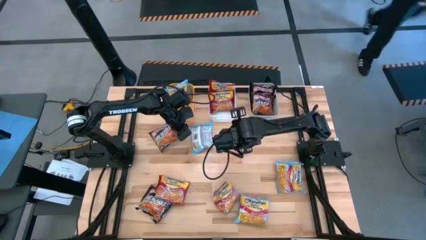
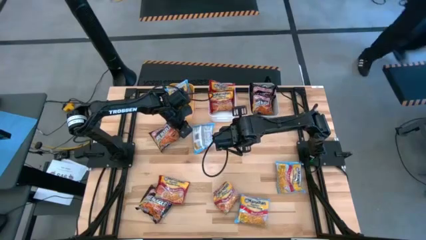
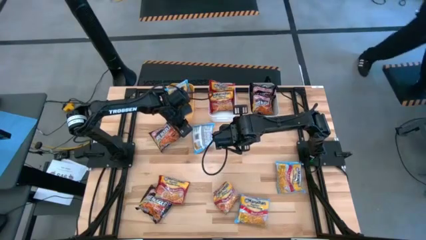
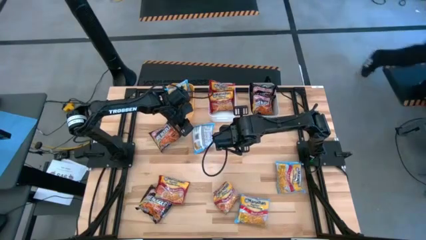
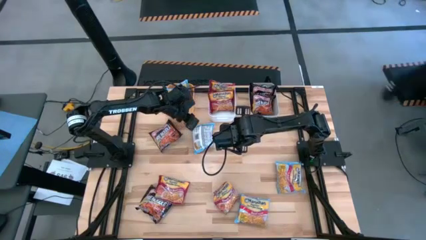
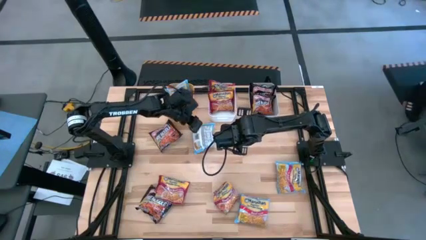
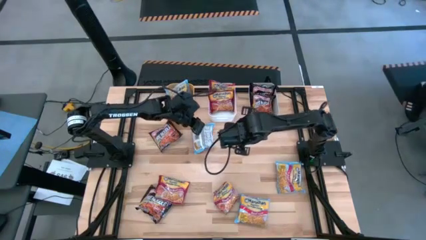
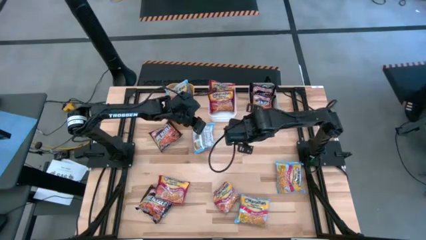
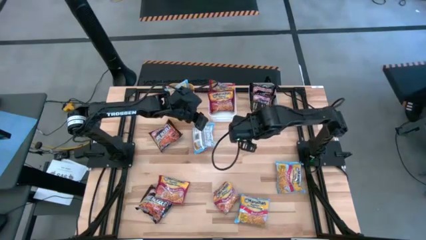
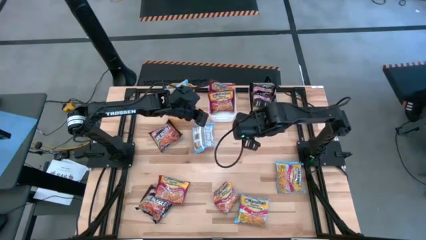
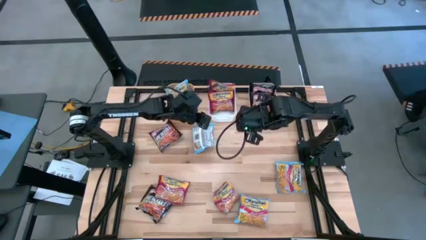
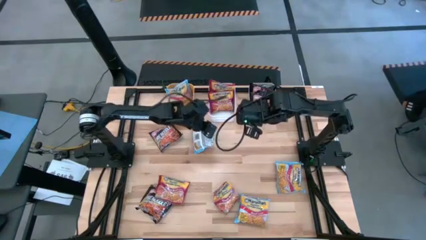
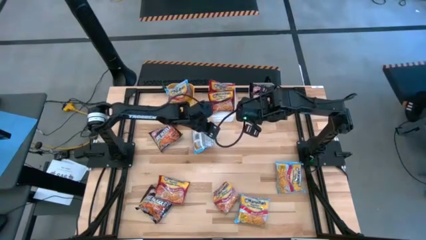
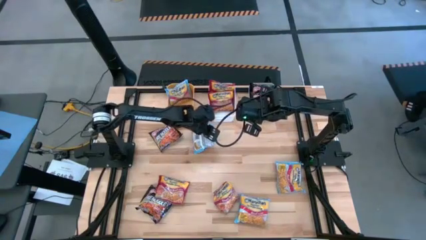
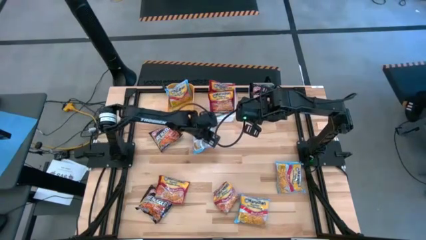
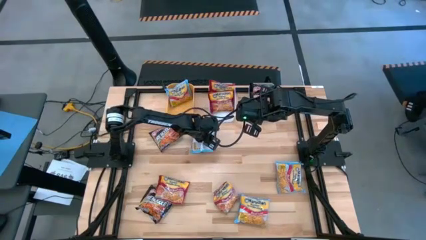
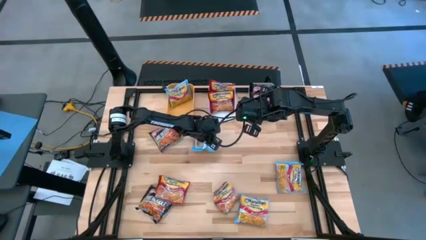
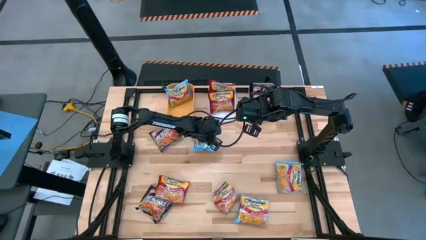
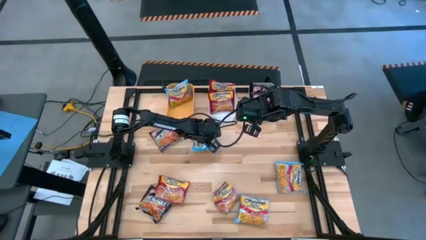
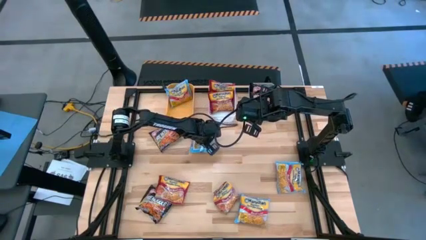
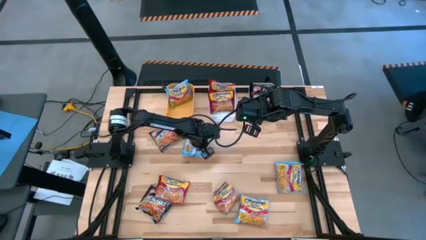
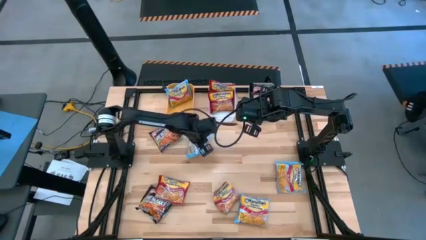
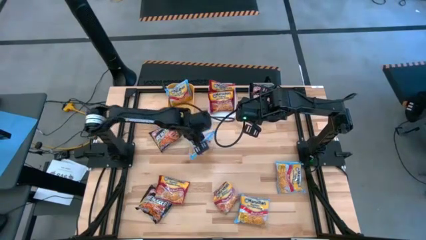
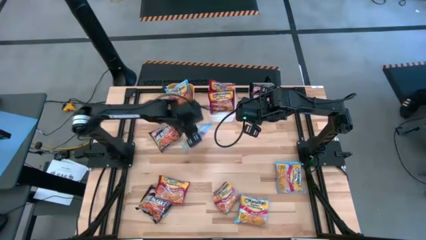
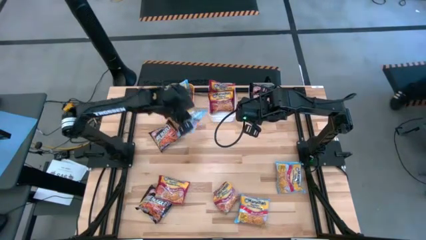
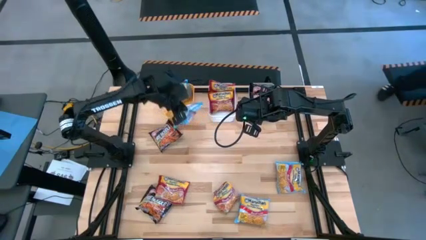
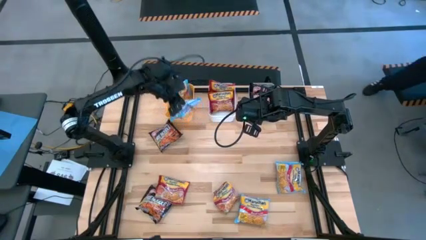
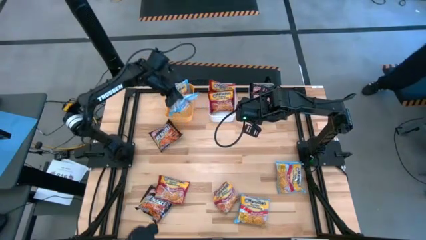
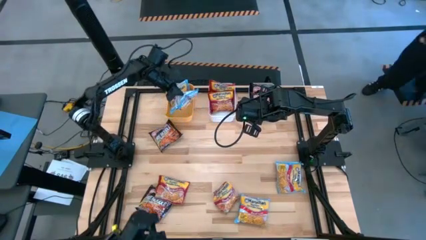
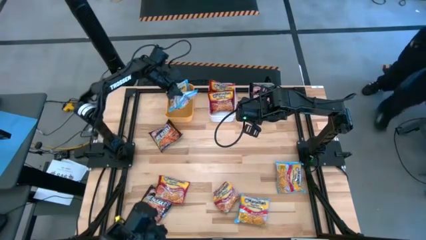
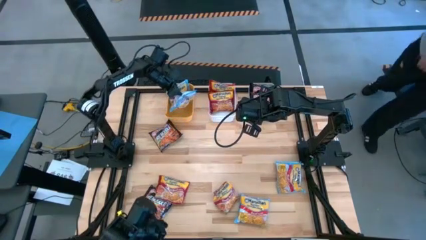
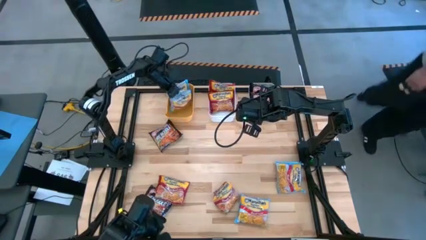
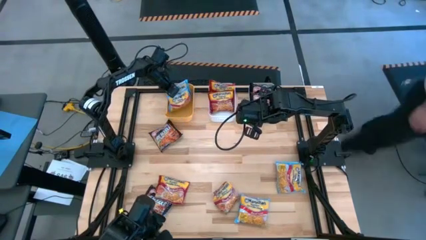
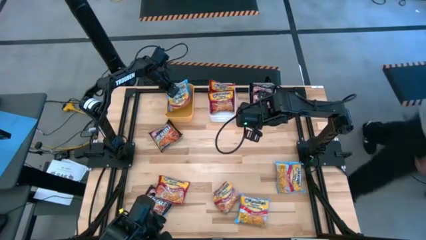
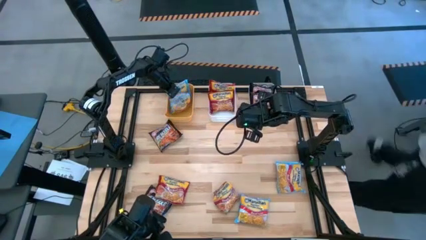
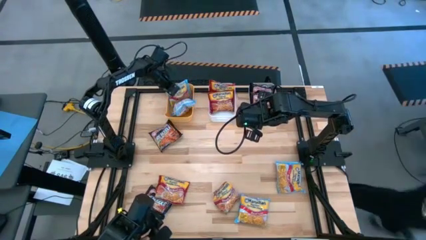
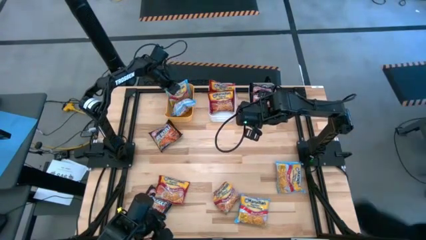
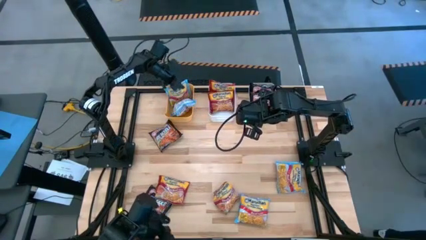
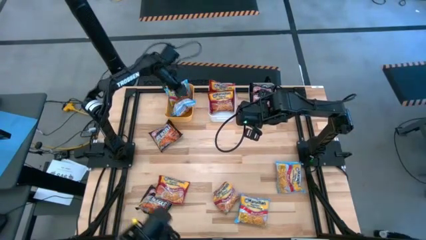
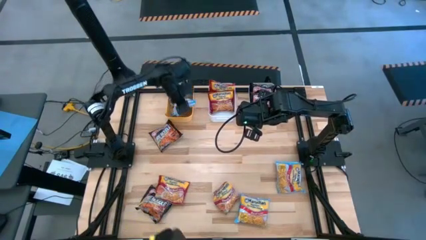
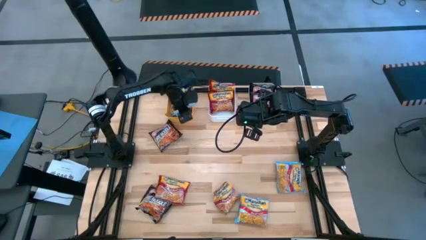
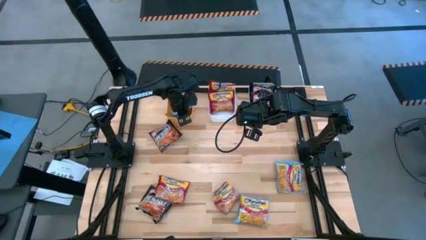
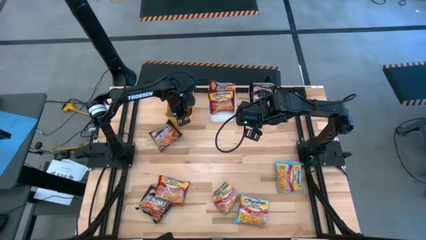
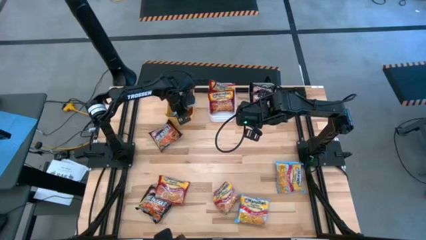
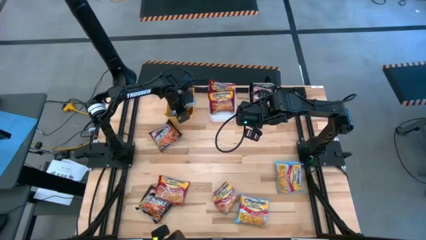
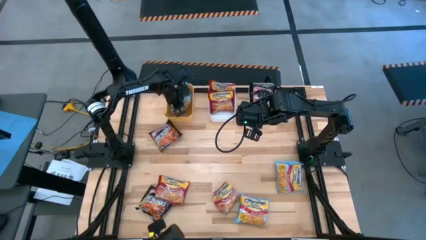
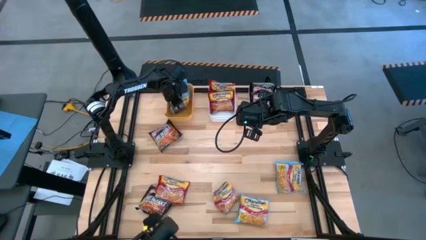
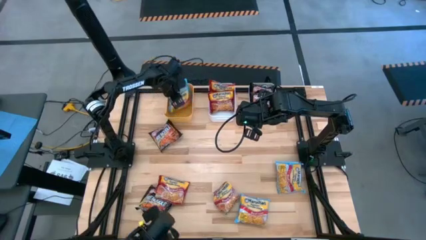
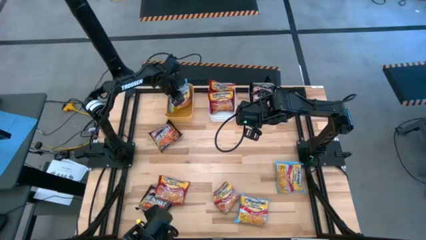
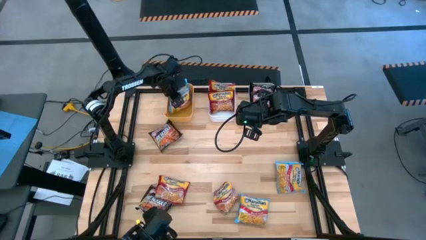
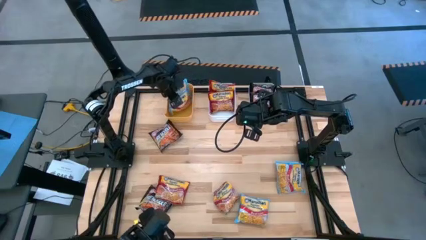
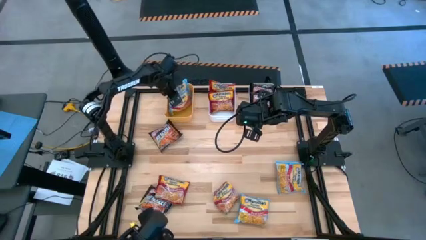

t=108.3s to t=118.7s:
Task: Sort Maruchan noodles
Put the blue noodle pack into the orange bin

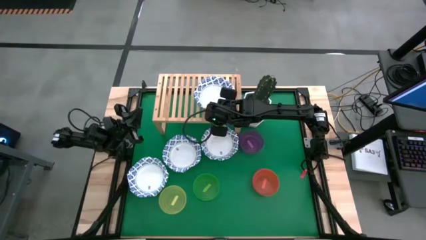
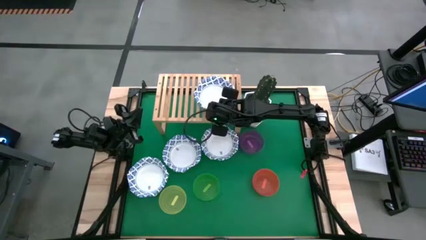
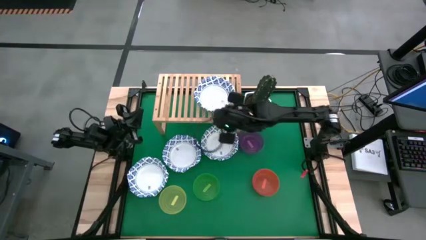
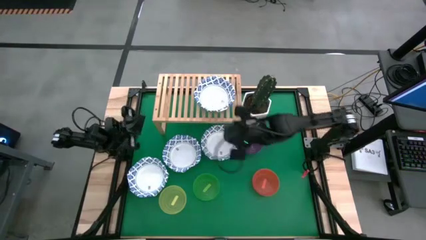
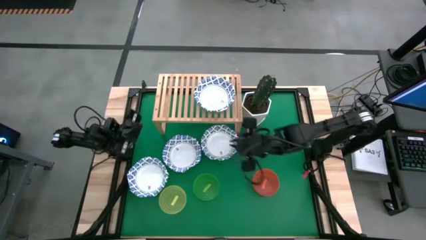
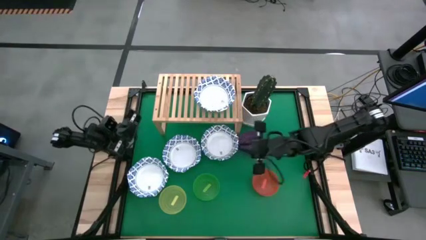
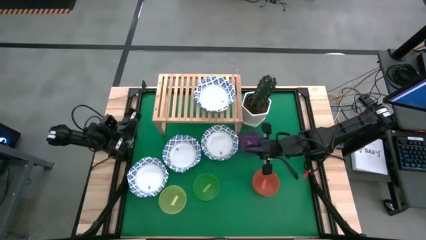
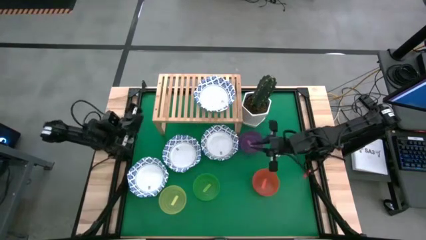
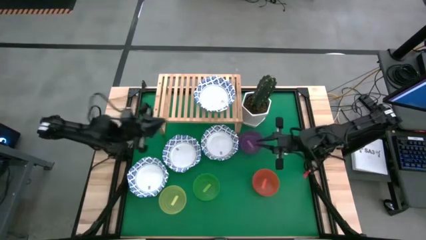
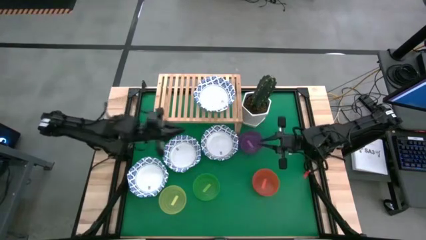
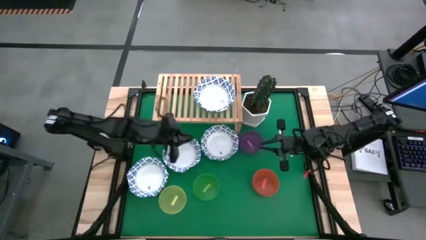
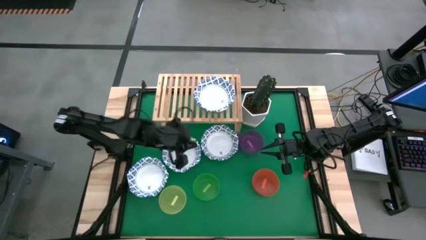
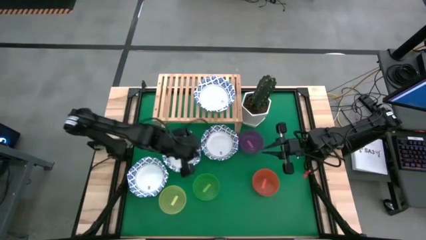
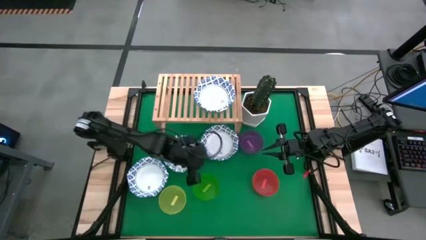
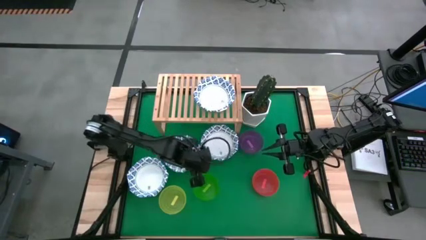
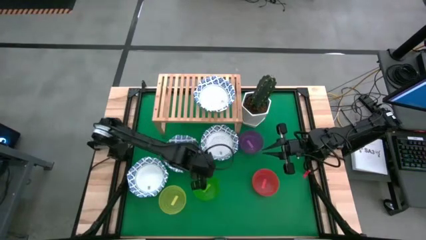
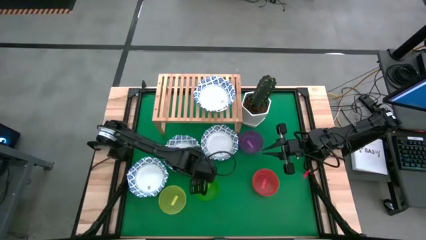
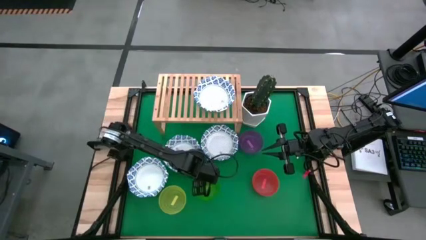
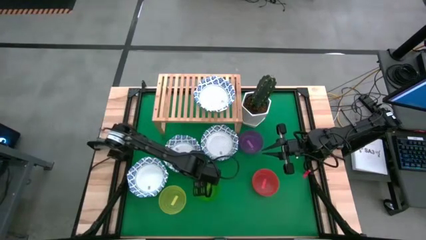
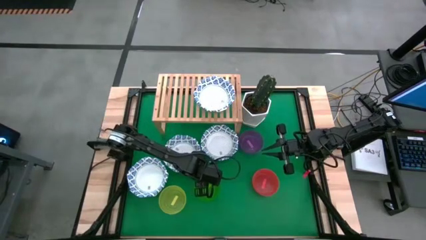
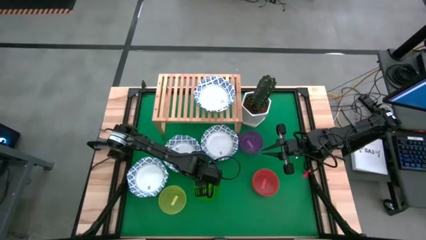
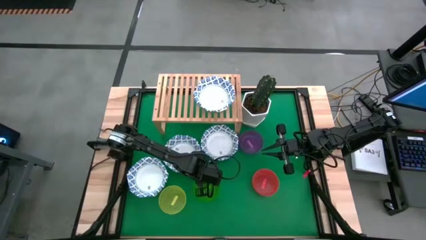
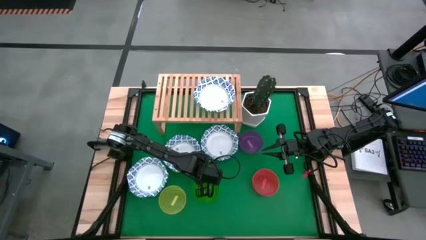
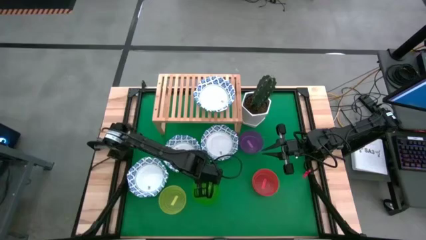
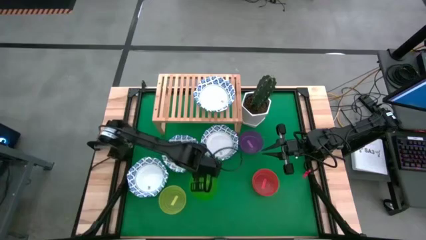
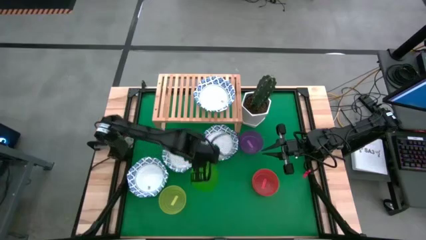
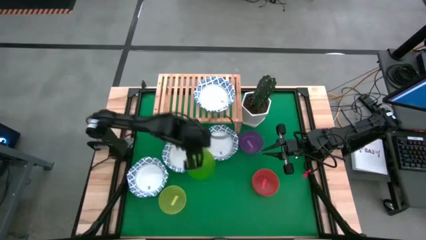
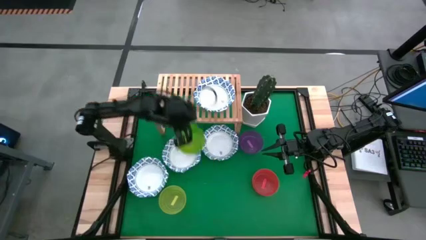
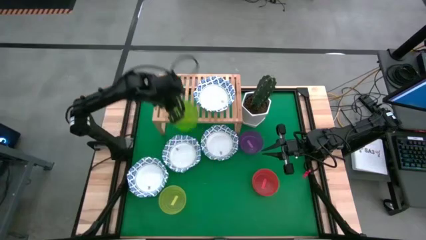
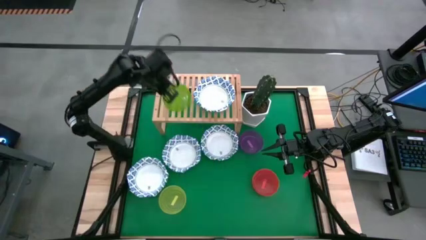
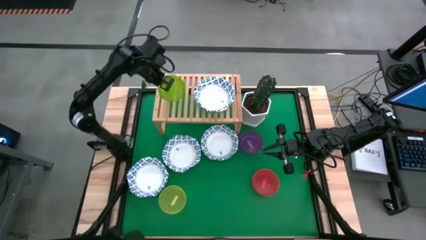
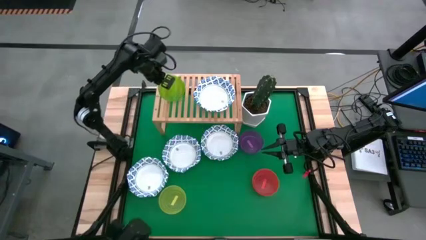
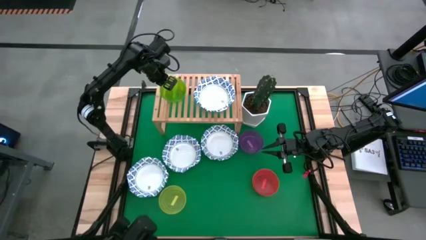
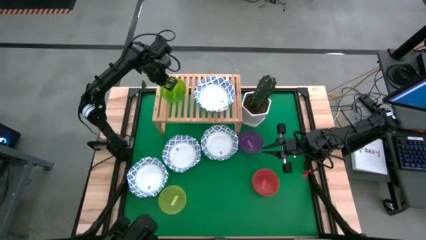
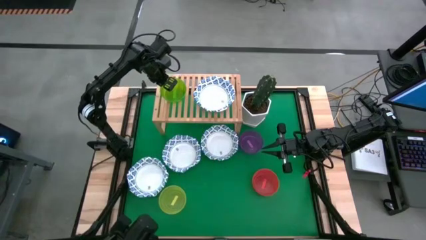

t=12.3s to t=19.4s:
Task: Place and stack bowls onto a shelf
Put the green bowl on the shelf
